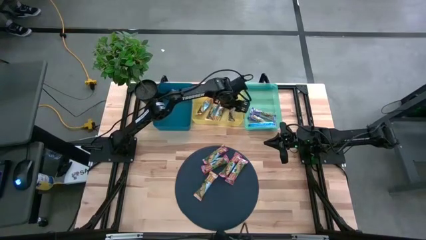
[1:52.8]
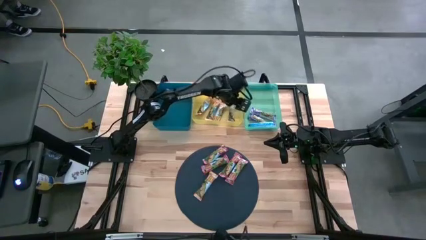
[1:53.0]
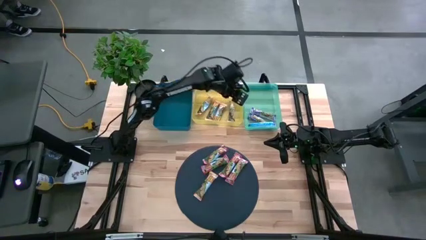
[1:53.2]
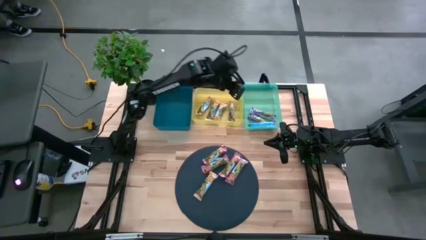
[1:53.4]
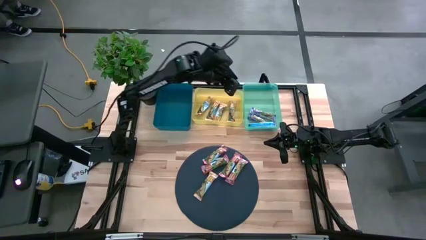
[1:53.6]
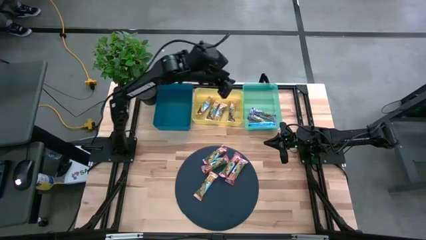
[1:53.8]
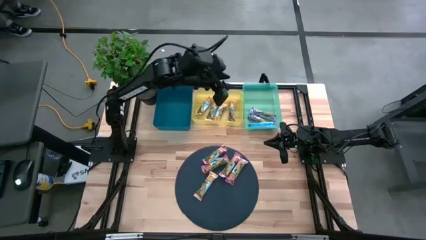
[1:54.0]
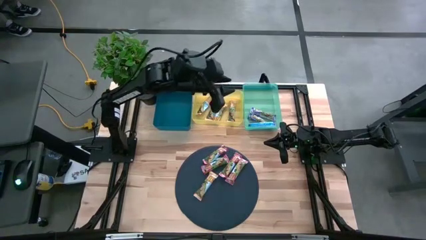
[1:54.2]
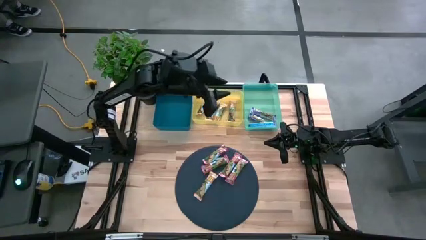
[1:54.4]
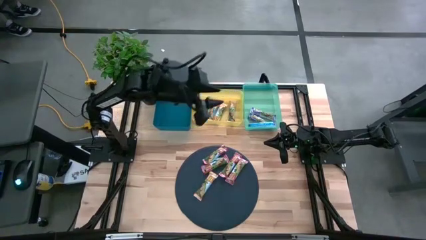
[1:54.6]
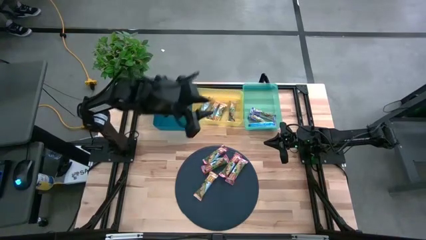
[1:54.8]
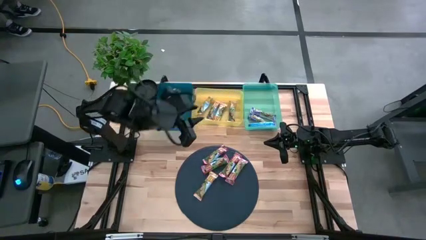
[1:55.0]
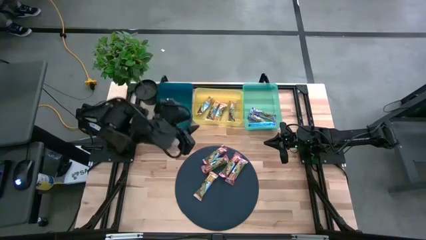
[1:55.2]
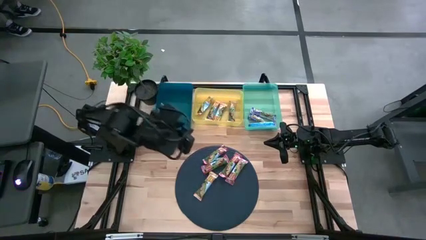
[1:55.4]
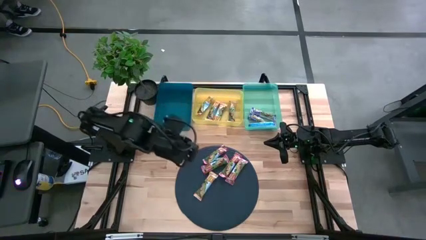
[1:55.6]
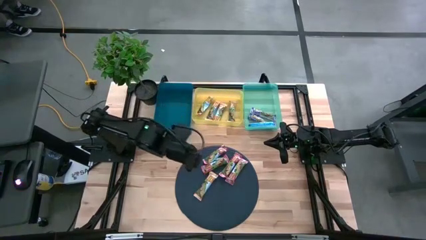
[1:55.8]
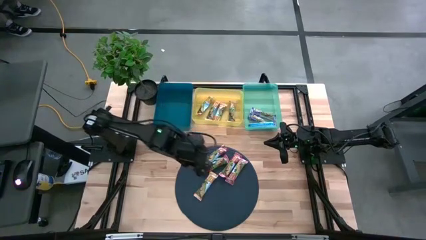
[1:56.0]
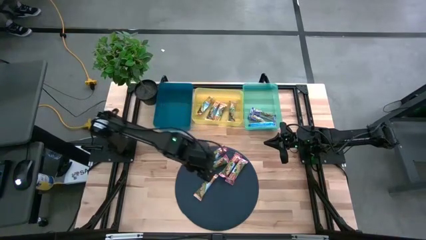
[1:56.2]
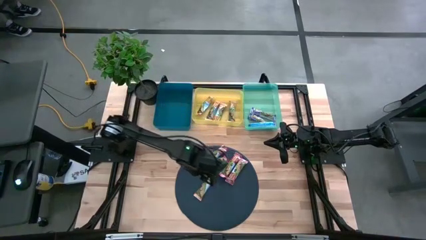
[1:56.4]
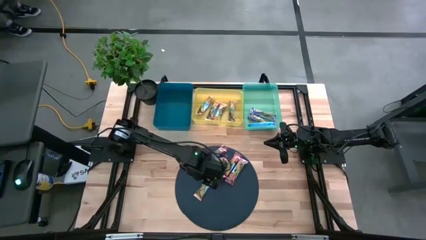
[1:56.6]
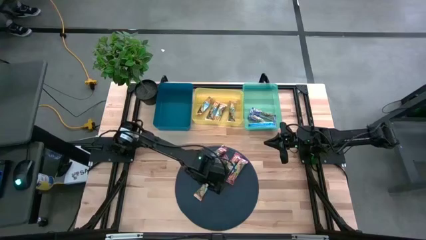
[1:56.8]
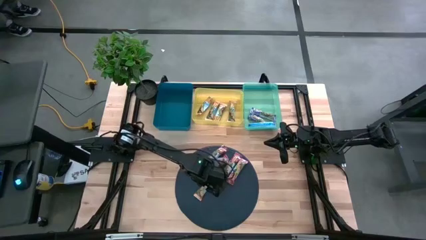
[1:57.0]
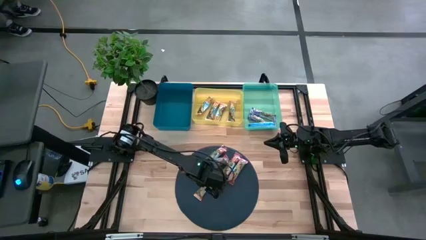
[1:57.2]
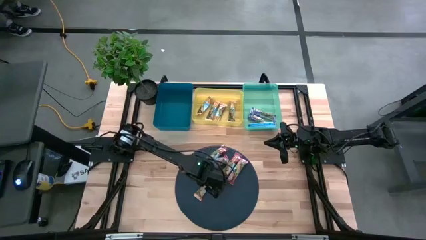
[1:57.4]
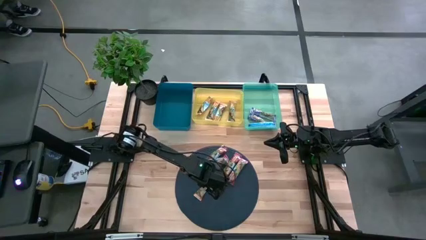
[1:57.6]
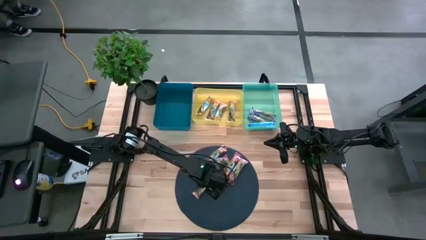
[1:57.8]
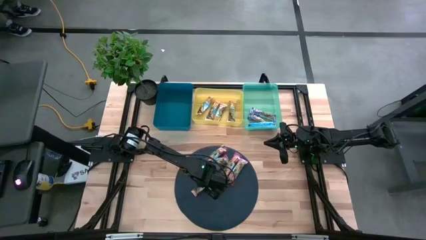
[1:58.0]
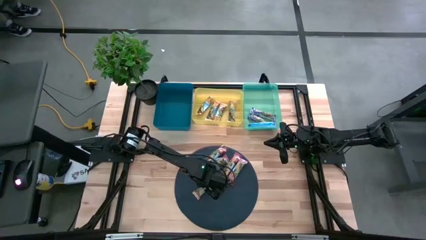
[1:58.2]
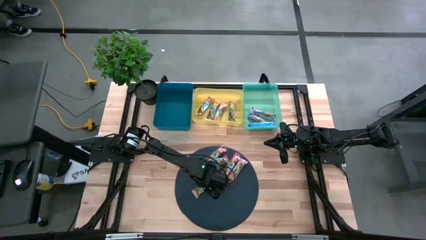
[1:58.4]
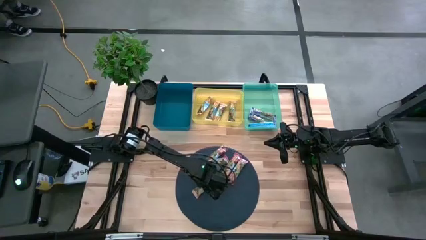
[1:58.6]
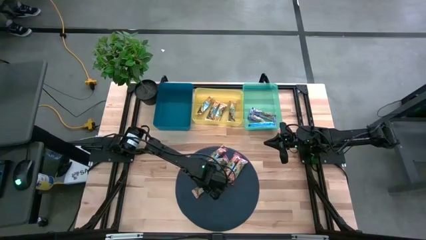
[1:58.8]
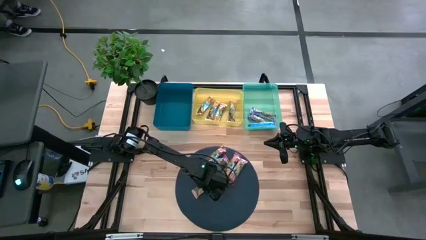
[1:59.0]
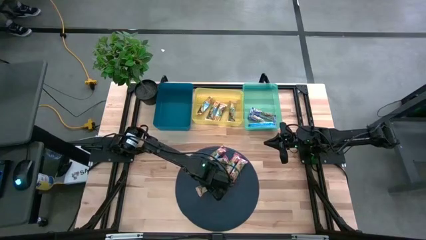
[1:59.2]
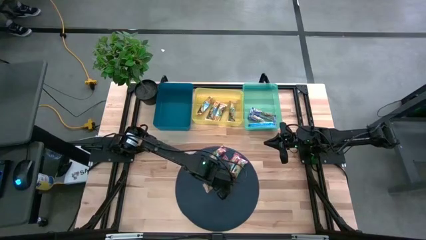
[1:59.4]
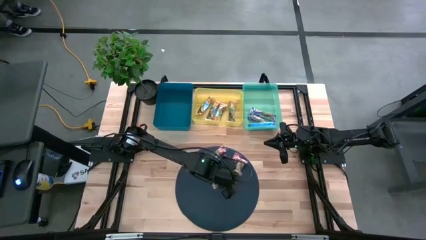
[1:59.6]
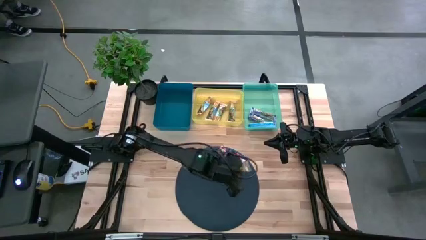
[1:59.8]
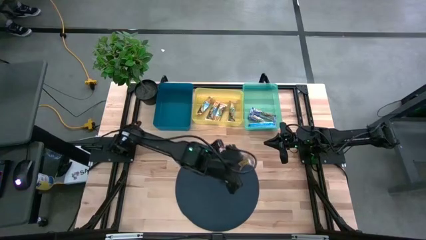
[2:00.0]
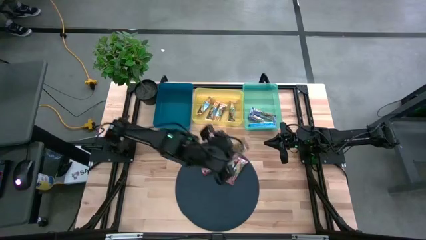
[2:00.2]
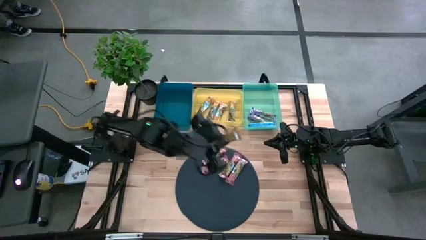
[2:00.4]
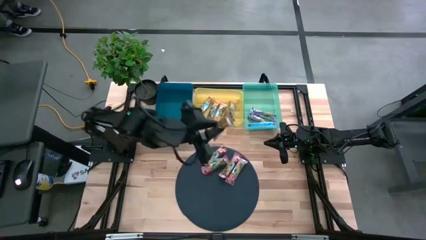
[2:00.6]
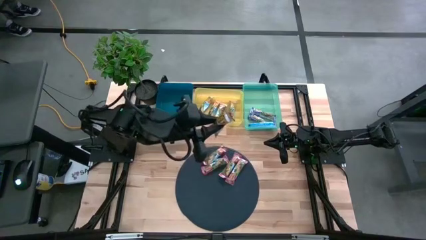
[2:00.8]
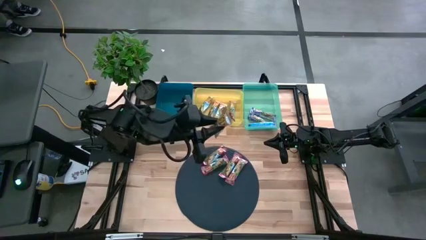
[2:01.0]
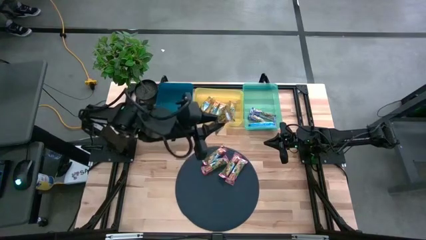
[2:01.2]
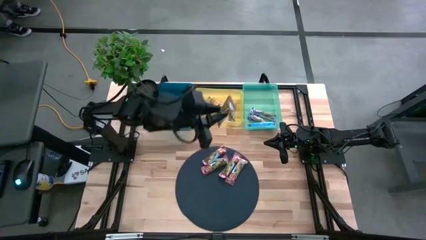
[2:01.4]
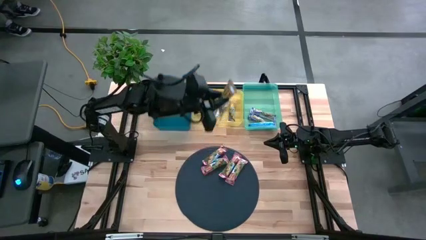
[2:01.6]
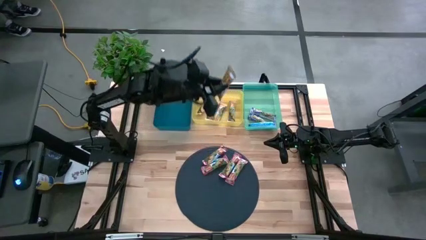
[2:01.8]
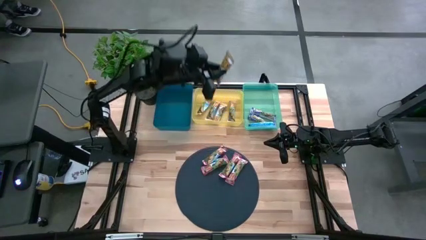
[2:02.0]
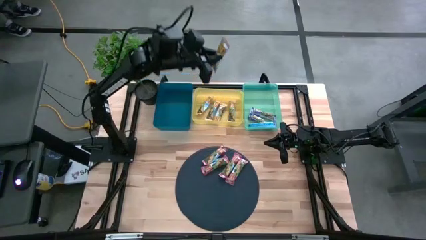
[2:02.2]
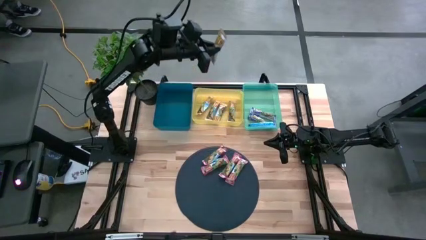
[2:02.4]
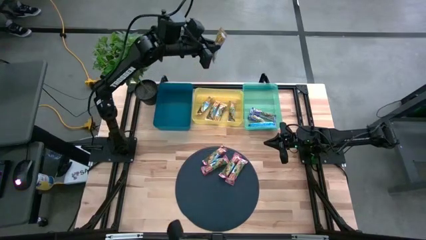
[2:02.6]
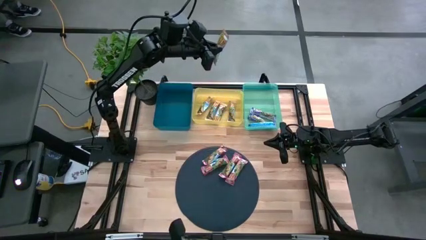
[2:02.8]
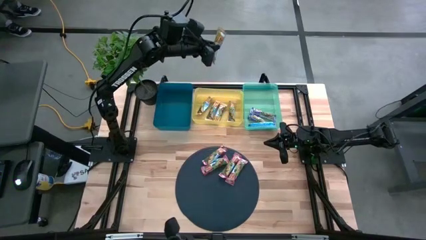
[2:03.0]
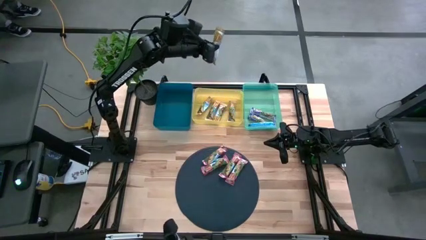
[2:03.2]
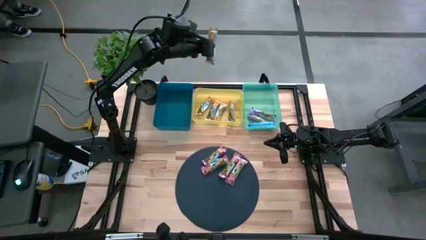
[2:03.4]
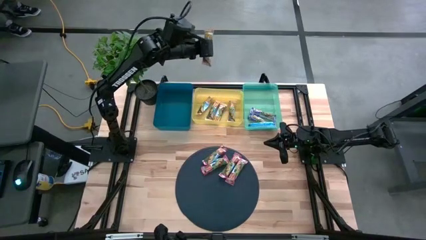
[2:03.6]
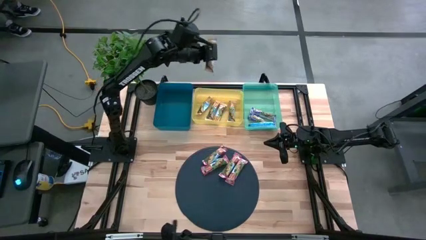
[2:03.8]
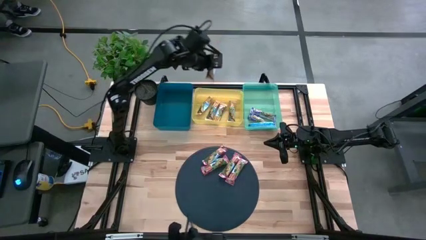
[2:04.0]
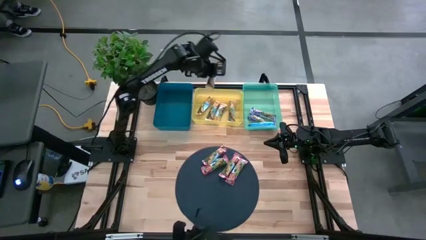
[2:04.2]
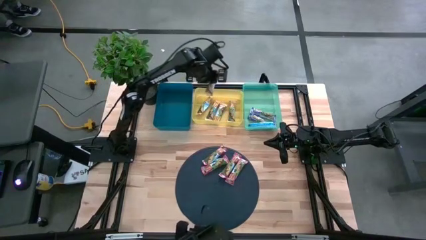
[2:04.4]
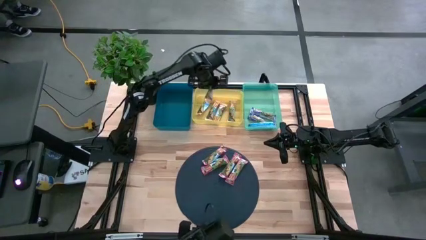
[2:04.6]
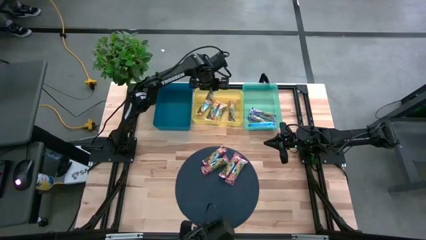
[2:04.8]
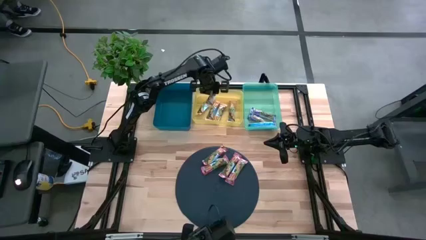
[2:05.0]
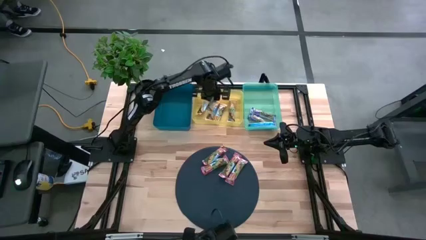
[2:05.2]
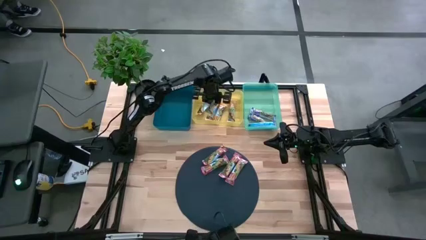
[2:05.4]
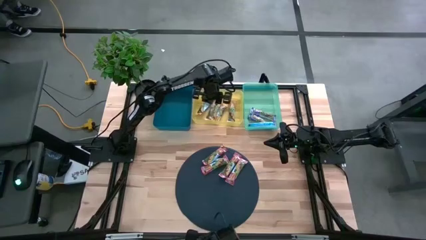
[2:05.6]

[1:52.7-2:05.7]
Task: Pick and place Granola Bars by type
Put the yellow granola bar into the yellow bin

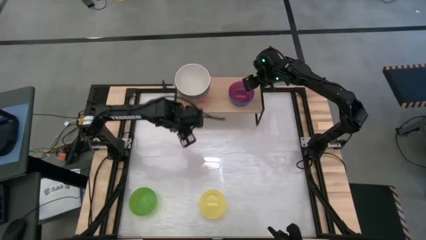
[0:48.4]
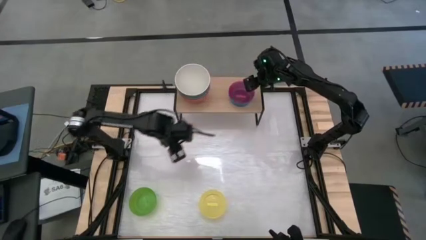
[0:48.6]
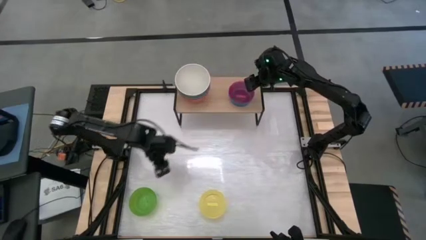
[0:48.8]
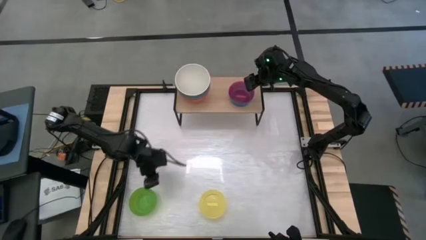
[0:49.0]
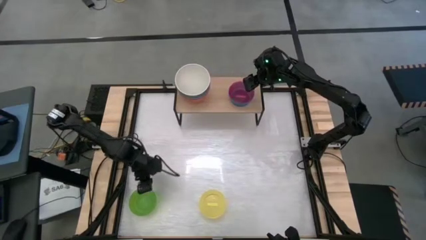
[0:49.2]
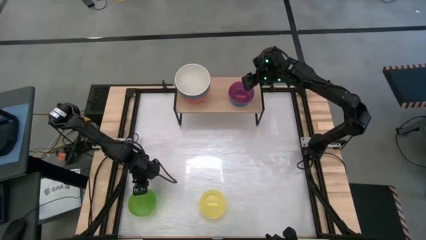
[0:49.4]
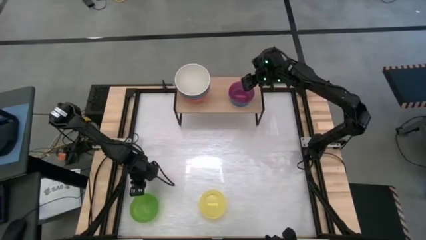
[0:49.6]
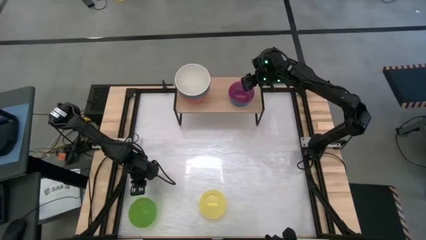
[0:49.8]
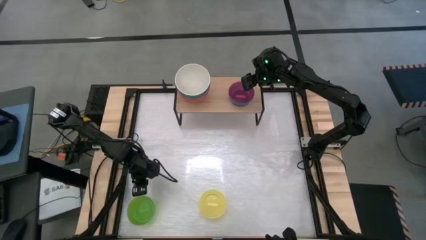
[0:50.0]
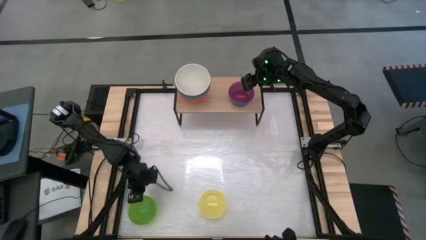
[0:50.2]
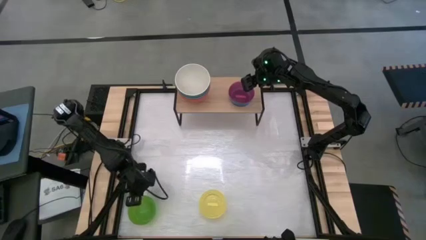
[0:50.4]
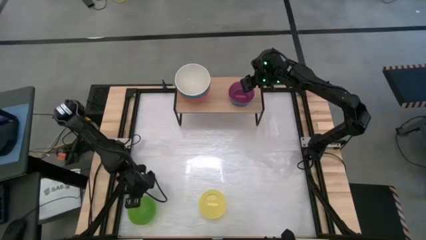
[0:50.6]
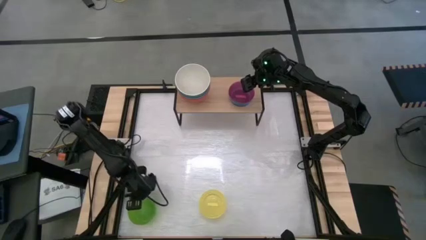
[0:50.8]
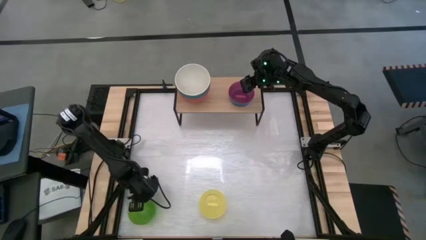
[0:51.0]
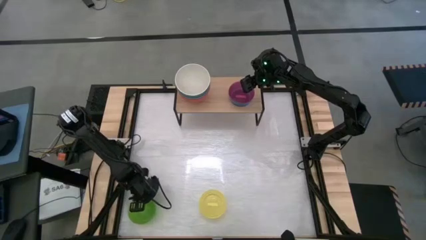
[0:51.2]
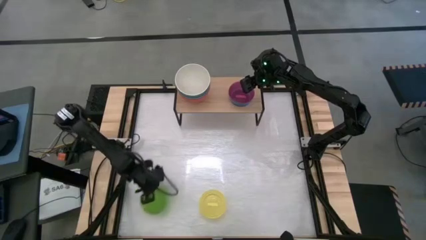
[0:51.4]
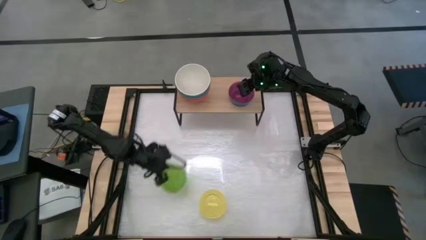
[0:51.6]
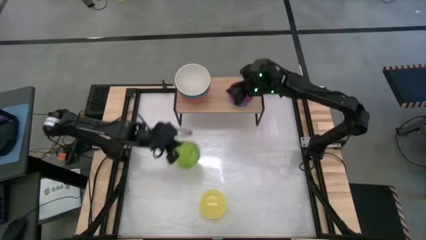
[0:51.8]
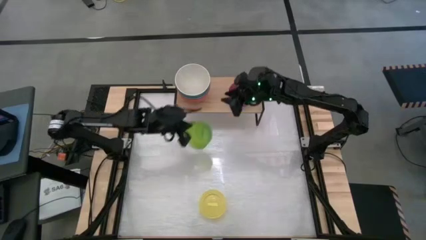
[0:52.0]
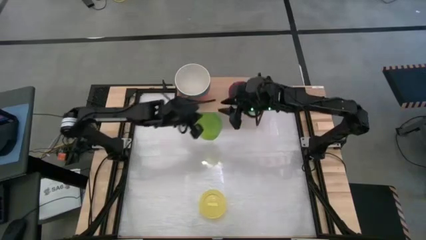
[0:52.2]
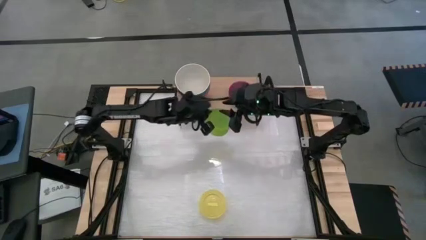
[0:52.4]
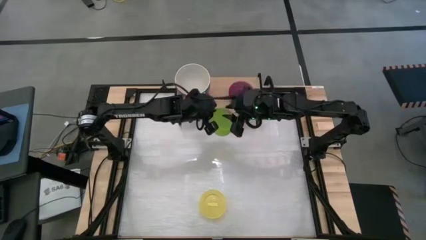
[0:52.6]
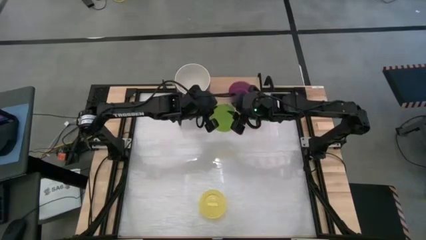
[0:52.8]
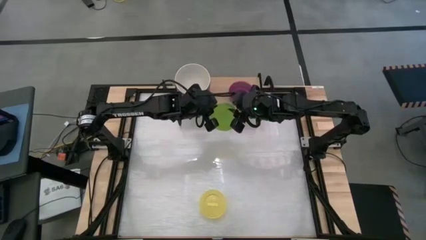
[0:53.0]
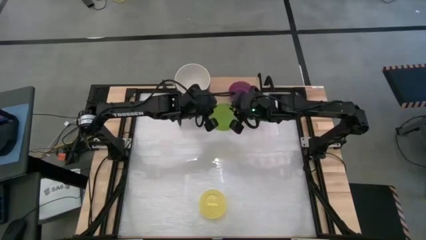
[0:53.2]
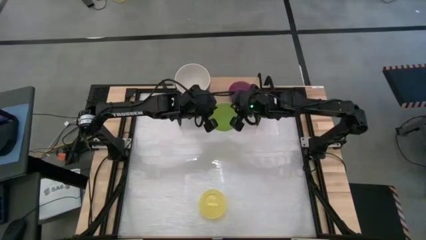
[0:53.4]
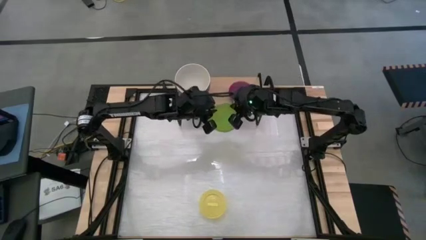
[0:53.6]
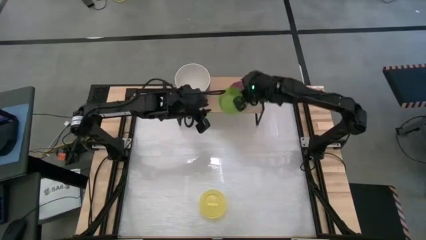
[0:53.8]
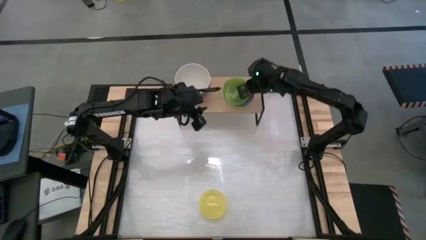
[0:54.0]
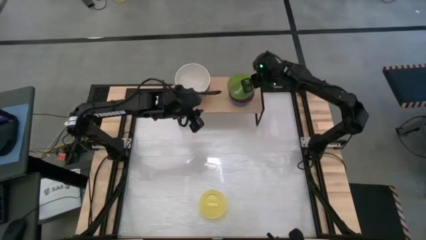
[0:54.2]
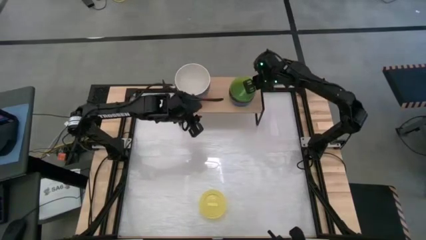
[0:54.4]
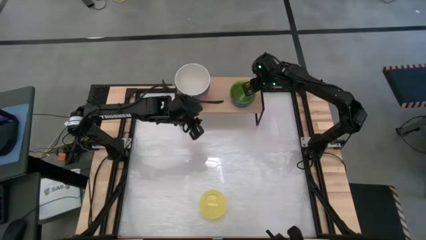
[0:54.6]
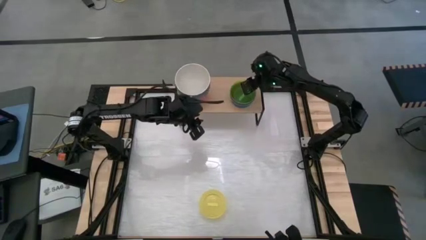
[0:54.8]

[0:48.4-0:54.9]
Task: Place and stack bowls onto a shelf
Stack the light green bowl on top of the light pink bowl on the shelf
